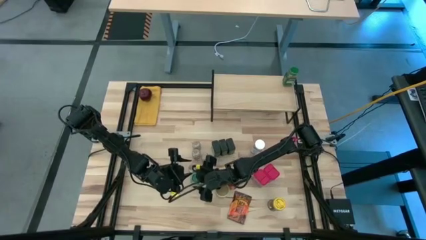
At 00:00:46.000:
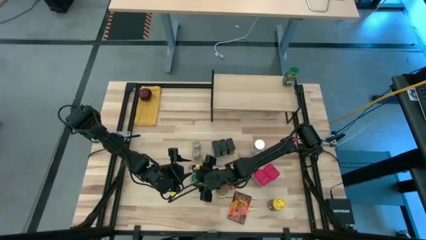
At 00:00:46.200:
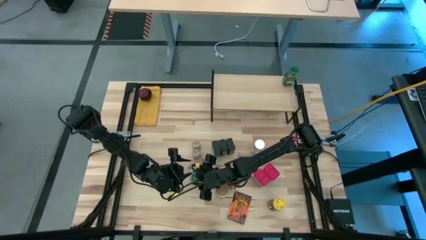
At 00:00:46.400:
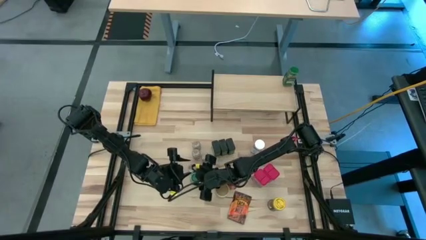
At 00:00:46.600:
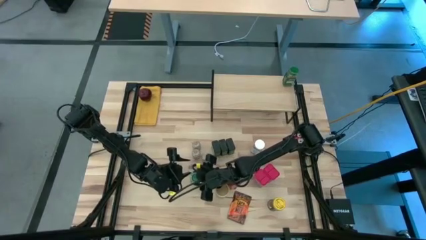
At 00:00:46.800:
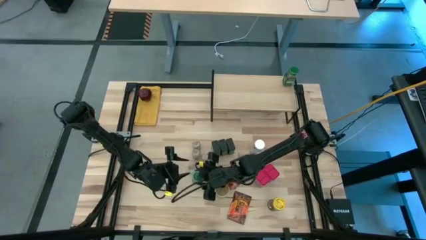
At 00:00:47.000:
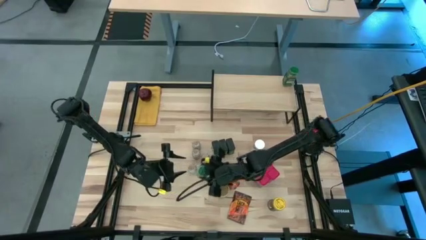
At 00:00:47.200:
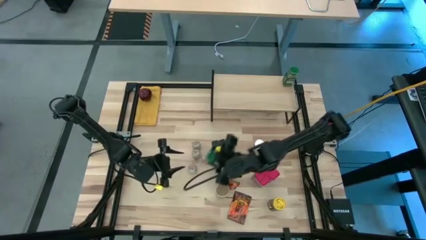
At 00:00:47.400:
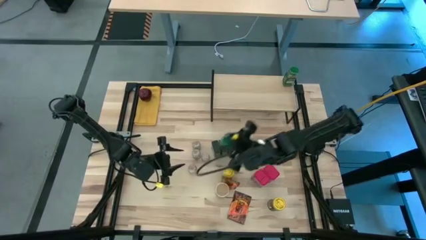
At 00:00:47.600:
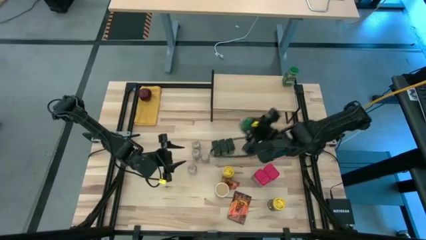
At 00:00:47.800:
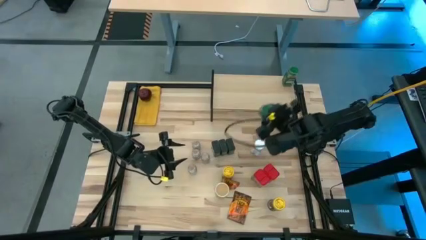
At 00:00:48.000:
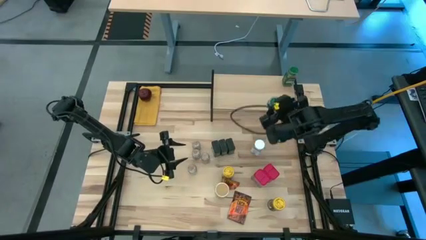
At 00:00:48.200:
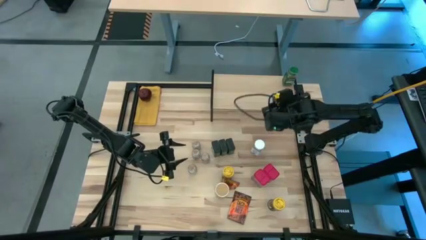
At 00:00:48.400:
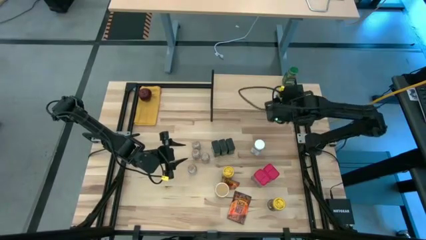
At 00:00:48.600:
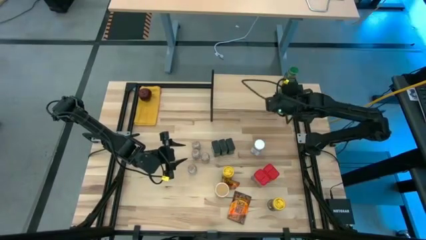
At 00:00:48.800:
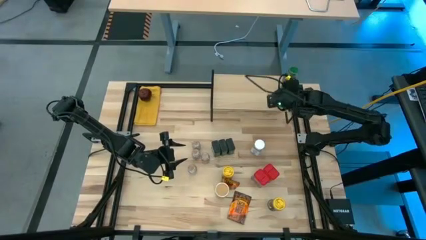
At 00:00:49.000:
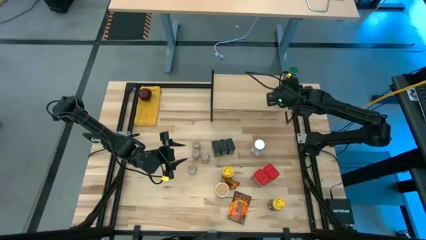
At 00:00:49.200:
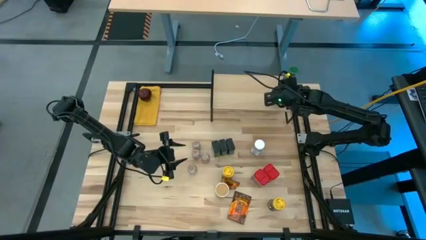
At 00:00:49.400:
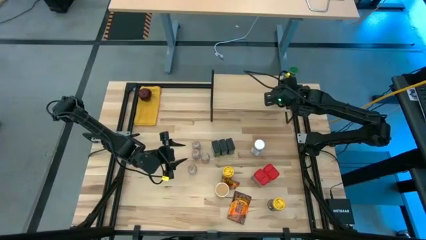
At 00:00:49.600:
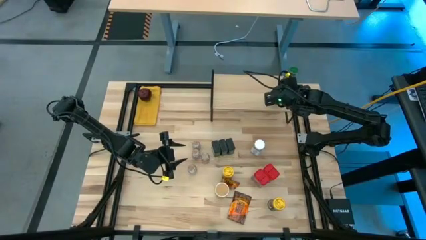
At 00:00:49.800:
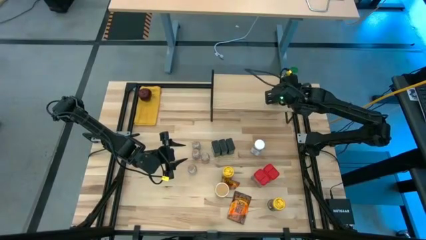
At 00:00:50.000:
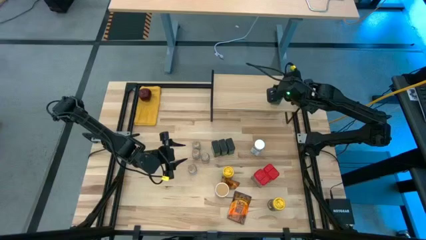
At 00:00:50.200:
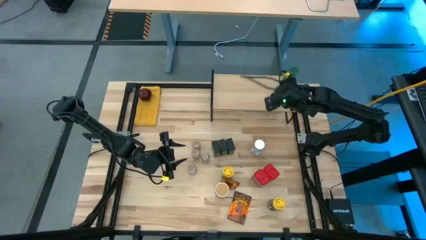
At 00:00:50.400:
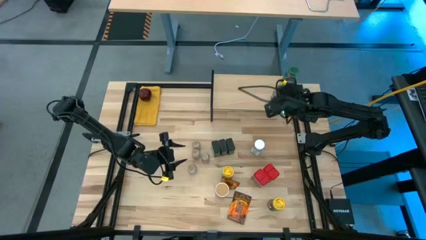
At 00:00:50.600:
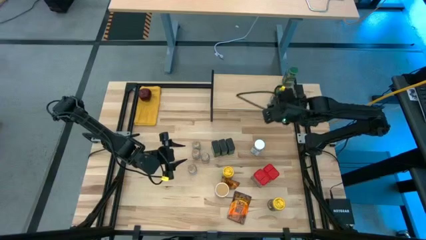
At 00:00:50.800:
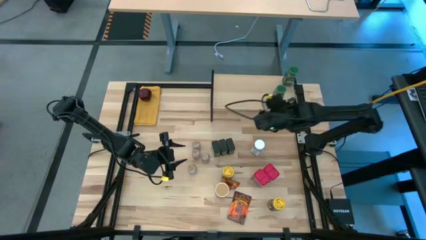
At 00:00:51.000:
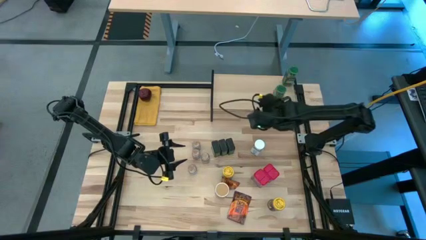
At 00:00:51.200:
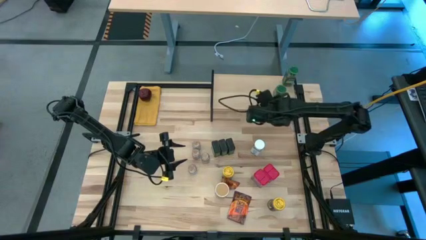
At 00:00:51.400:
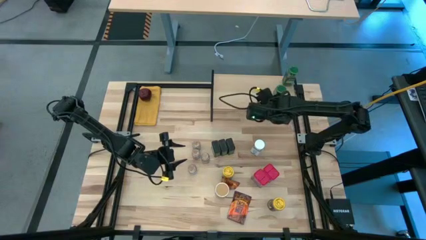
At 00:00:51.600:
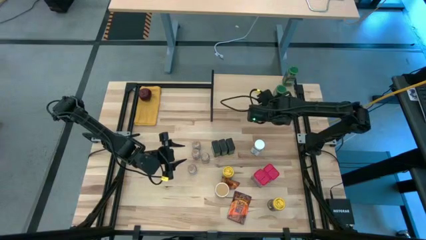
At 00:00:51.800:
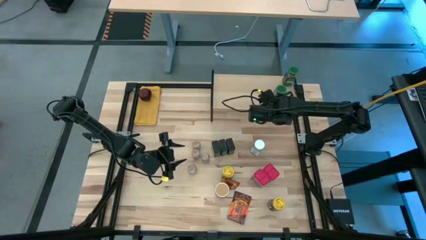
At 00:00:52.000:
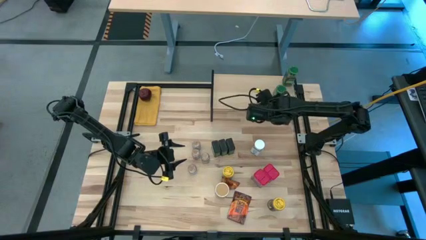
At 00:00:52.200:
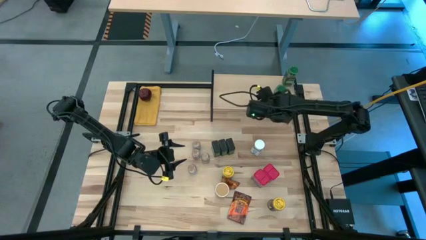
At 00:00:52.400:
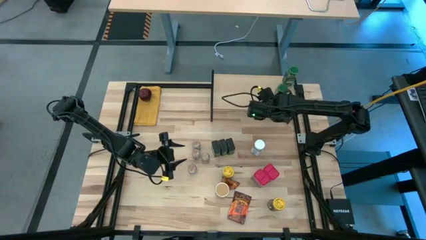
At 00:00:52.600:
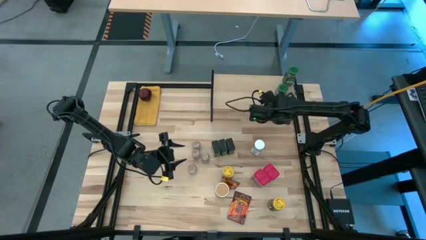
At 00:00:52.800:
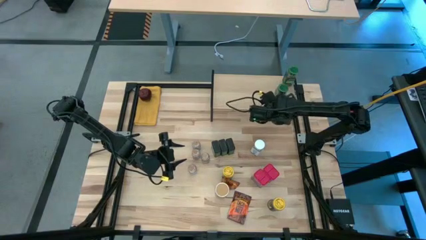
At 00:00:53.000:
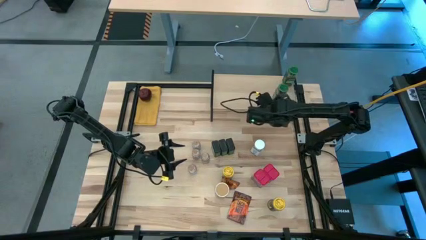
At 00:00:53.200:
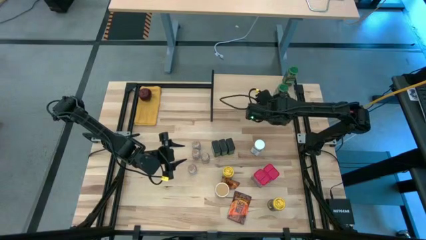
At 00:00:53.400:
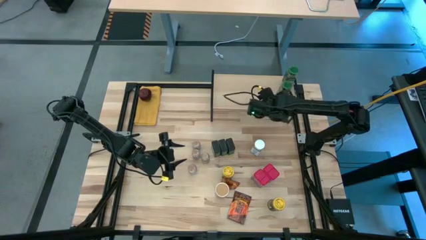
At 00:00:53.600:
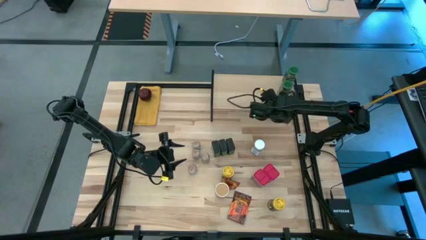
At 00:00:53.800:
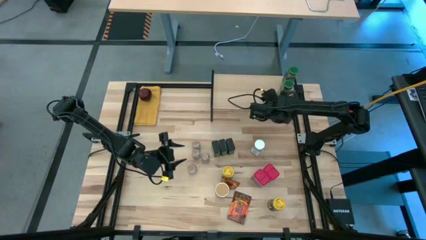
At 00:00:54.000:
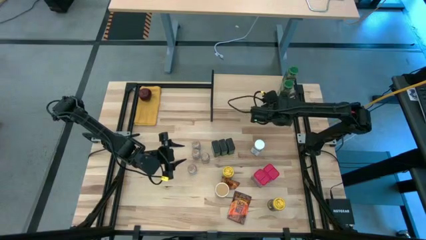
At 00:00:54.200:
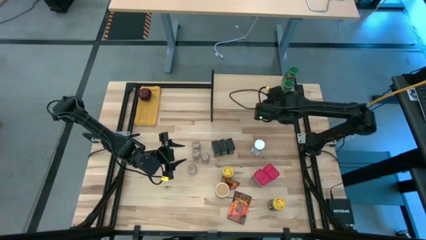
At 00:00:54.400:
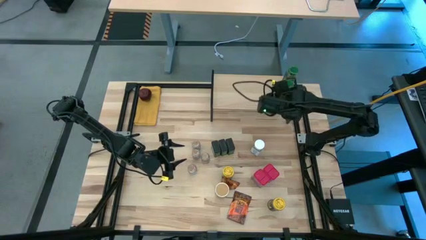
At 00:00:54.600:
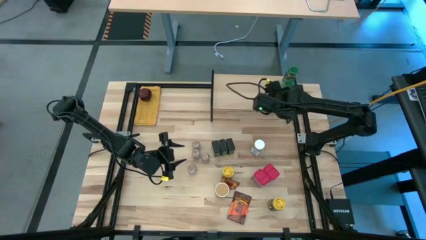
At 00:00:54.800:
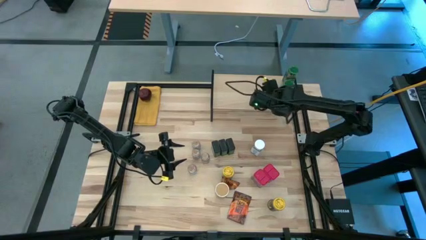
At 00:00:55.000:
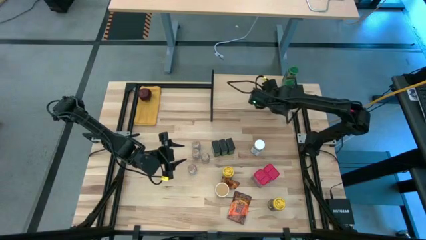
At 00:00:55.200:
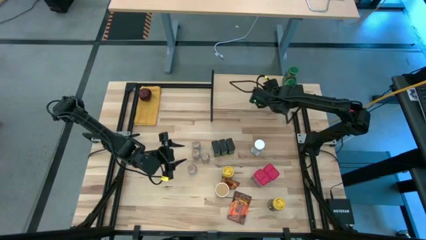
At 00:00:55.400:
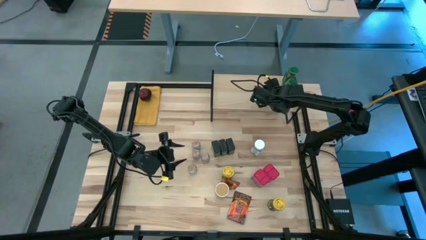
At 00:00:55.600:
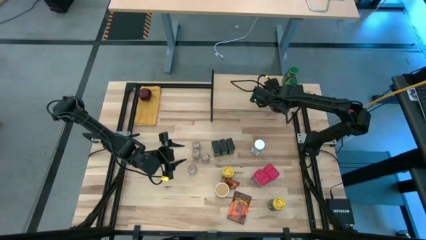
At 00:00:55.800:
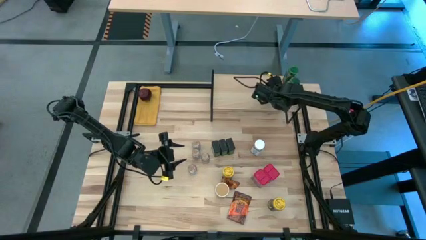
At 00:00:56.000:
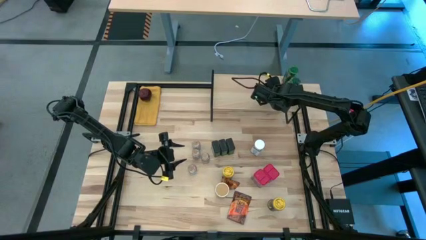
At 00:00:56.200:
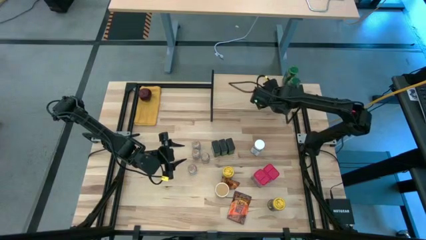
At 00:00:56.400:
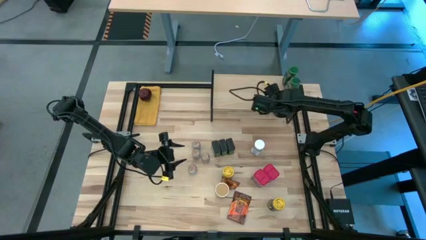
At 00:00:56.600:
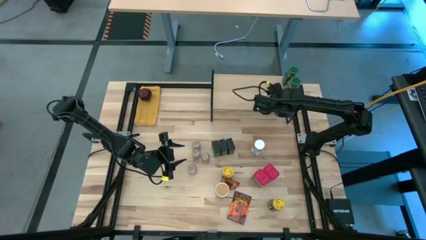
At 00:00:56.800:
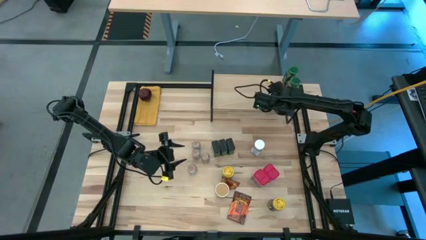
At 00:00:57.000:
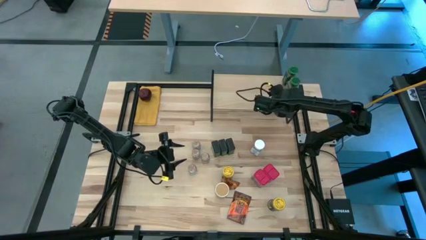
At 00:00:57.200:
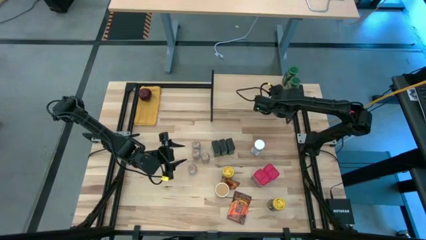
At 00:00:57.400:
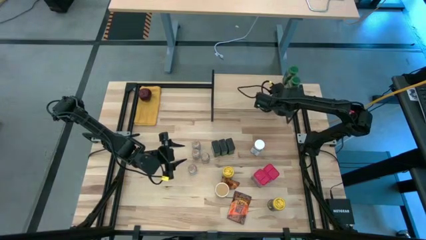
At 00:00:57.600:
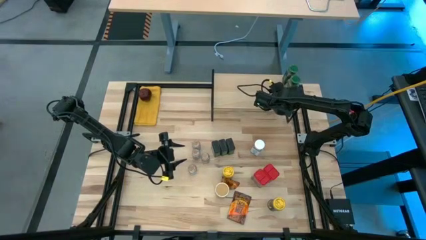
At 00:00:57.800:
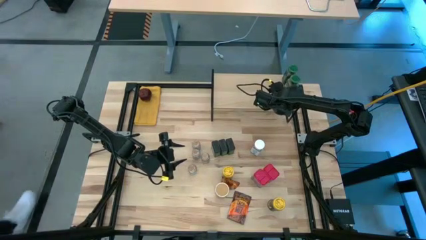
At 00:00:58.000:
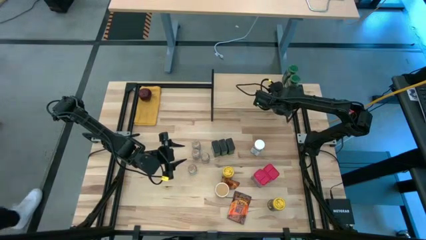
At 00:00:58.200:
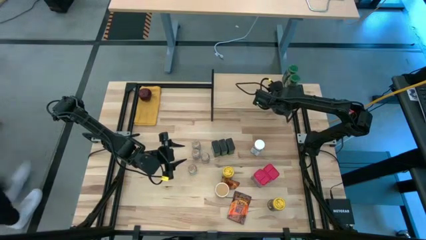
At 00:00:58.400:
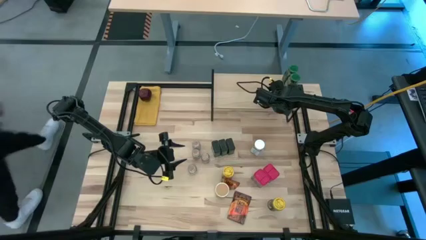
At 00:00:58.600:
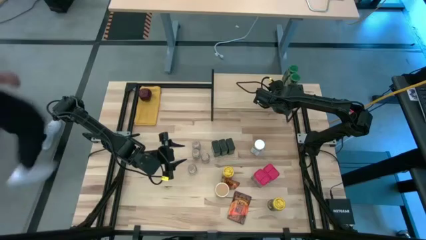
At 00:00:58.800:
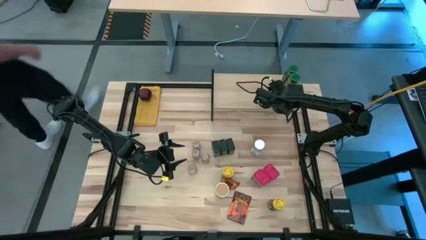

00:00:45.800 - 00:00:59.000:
Task: Shelf spices
Put the green seasoning bottle on the shelf and align it with the other green seasoning bottle

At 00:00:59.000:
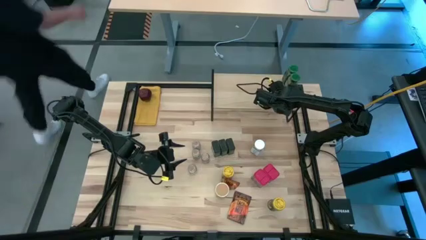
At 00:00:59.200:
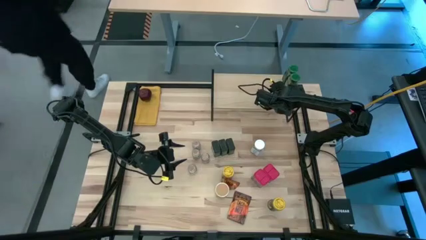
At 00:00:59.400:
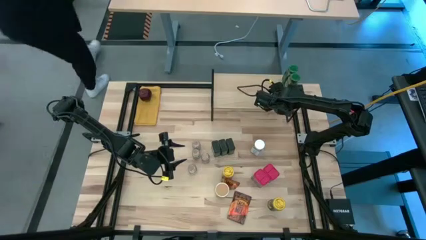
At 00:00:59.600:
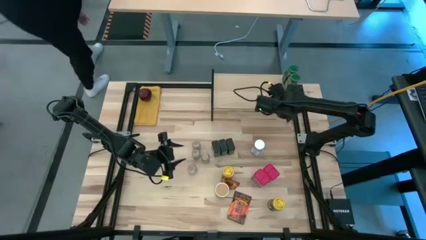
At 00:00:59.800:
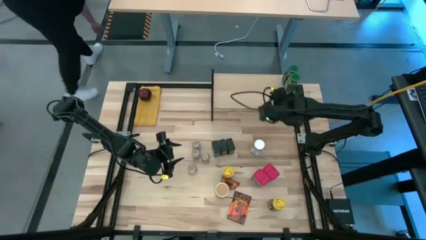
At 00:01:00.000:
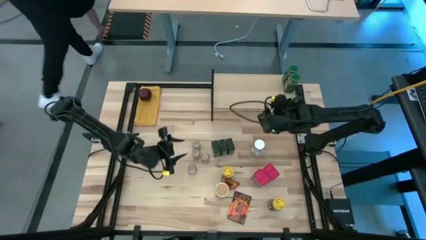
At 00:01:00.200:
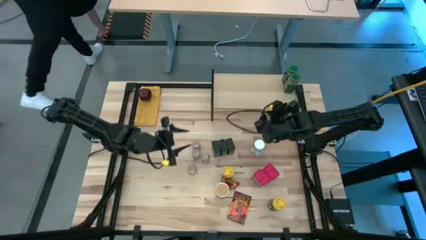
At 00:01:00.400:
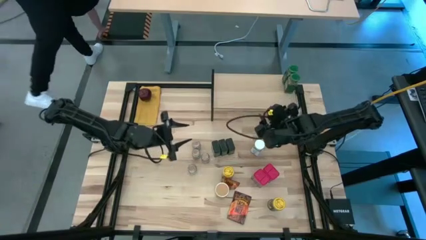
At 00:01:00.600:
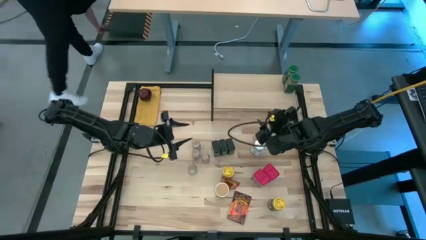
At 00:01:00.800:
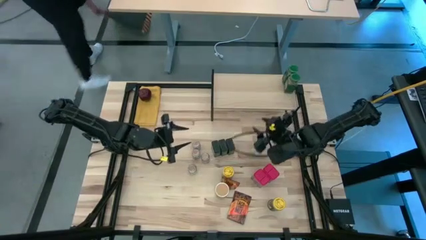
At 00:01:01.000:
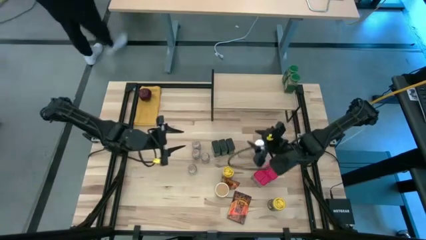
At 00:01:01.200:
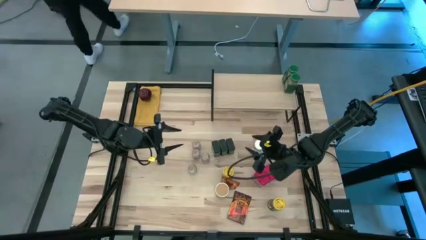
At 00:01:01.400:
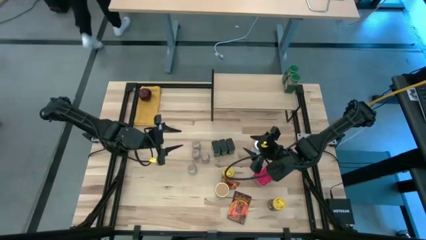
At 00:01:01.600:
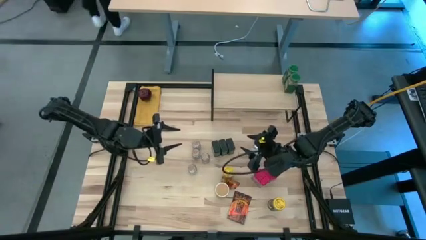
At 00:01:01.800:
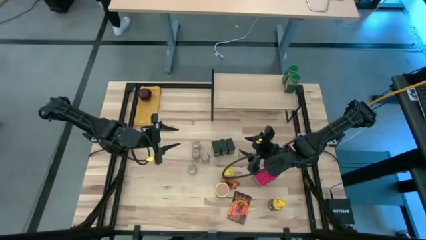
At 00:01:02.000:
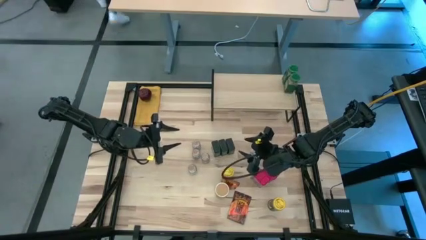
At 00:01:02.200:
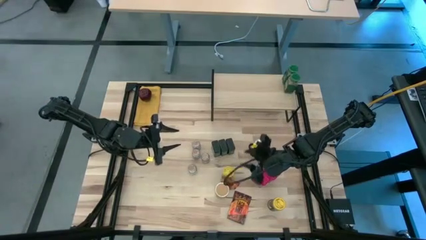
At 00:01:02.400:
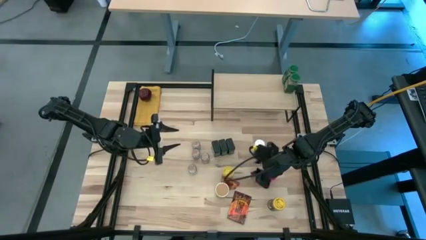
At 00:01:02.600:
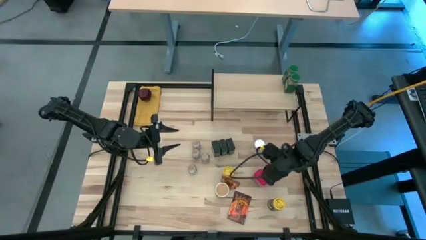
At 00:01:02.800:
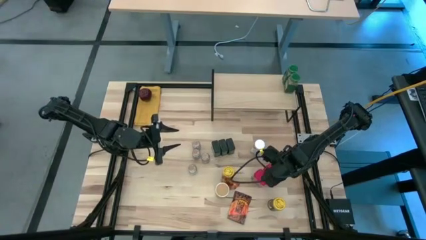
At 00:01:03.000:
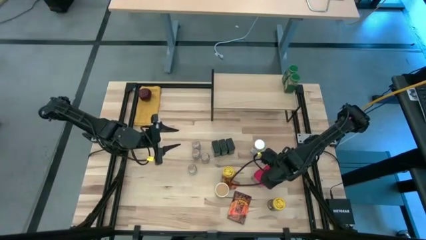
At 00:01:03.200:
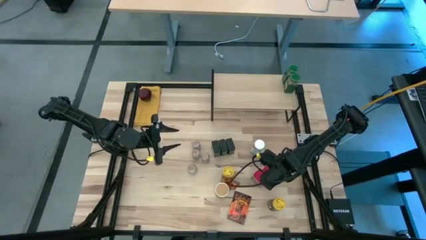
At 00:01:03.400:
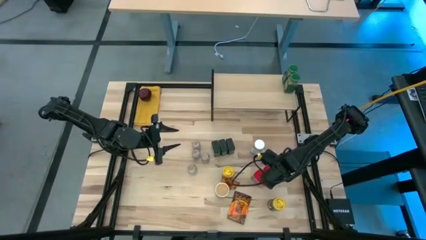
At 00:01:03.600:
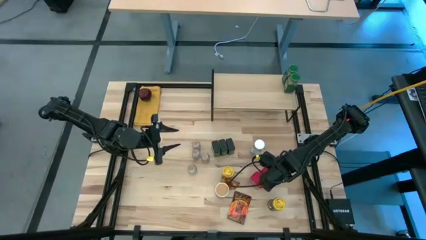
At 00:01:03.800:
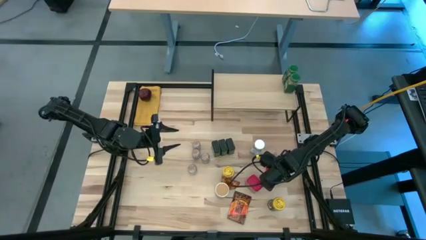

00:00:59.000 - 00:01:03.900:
Put the top red seasoning can on the shelf
